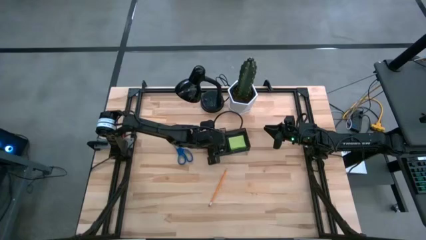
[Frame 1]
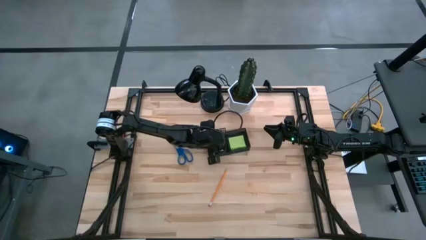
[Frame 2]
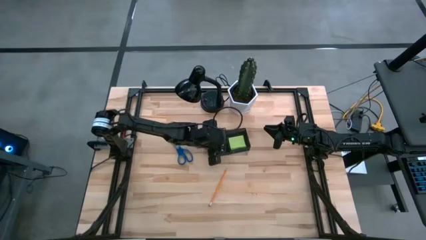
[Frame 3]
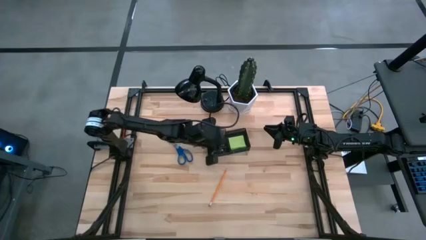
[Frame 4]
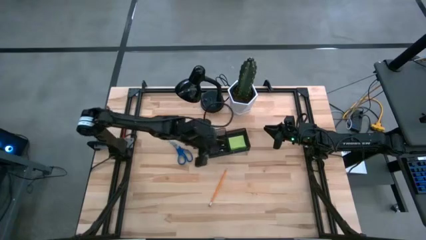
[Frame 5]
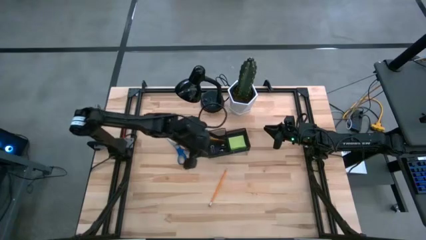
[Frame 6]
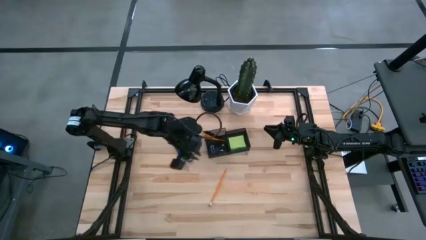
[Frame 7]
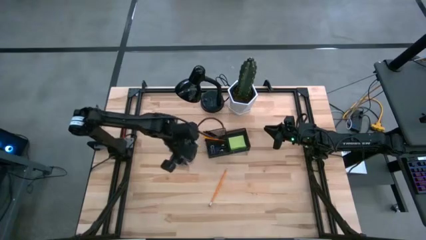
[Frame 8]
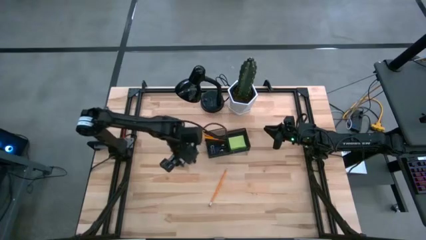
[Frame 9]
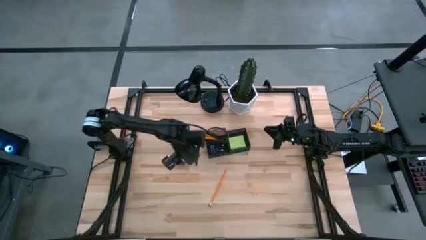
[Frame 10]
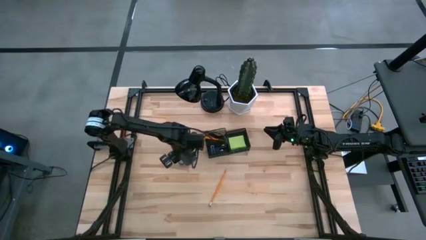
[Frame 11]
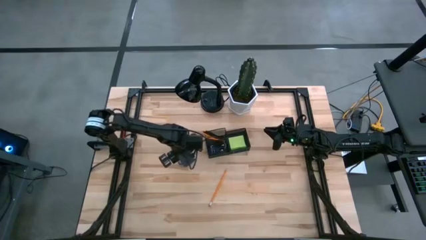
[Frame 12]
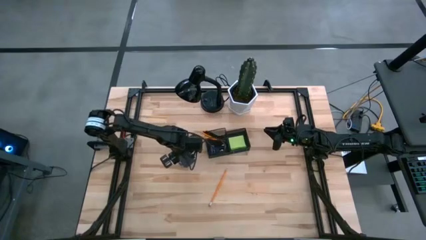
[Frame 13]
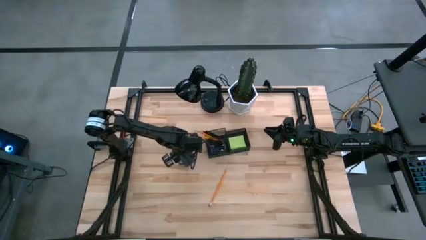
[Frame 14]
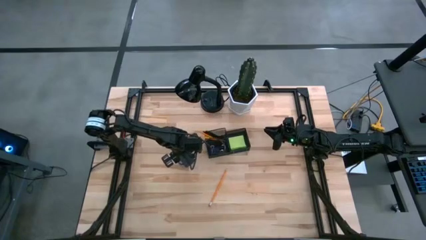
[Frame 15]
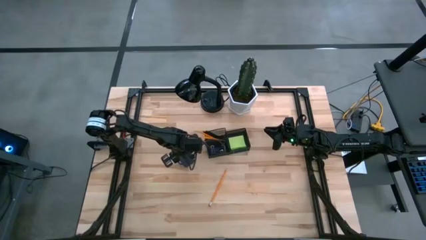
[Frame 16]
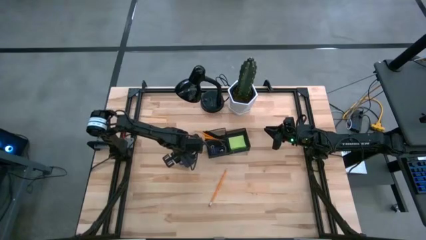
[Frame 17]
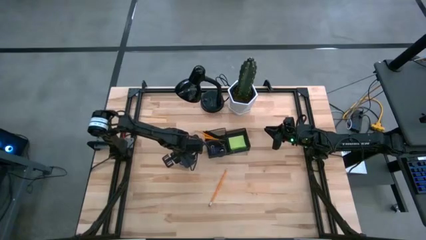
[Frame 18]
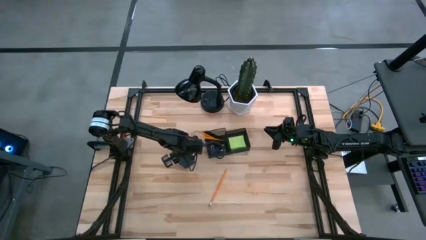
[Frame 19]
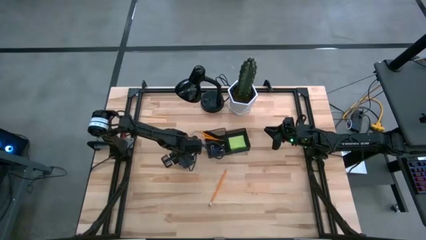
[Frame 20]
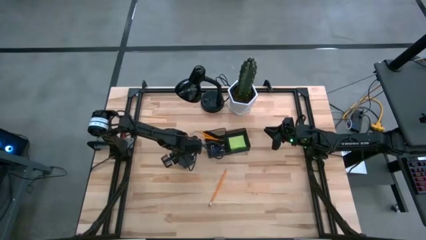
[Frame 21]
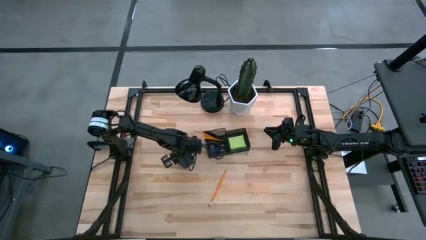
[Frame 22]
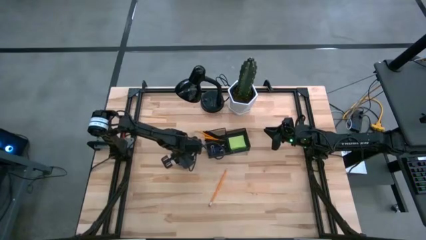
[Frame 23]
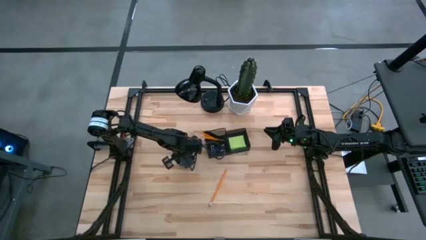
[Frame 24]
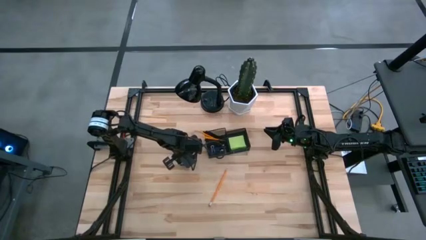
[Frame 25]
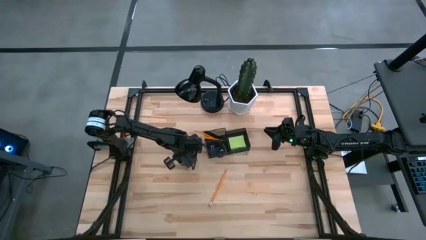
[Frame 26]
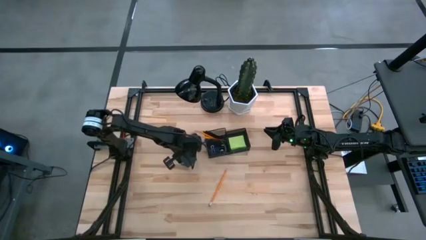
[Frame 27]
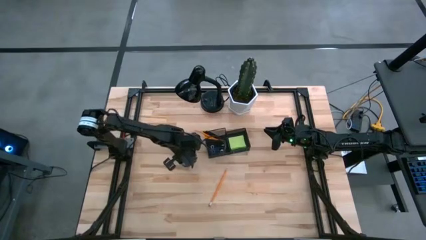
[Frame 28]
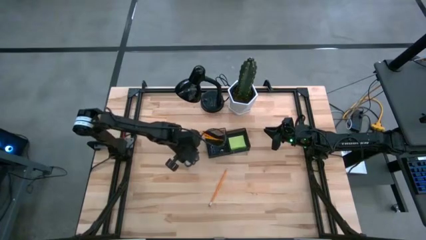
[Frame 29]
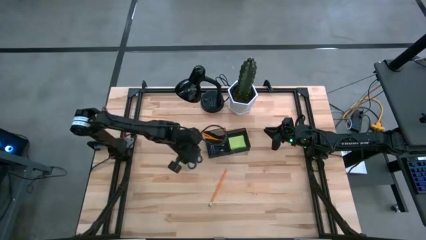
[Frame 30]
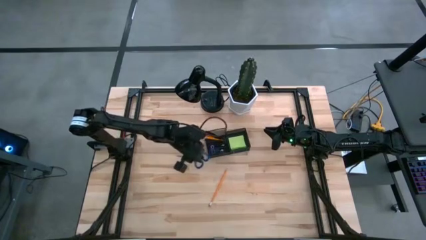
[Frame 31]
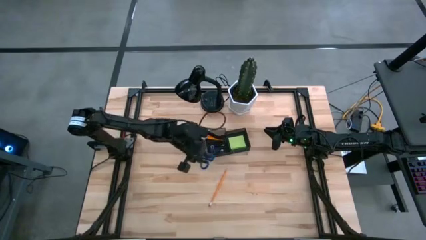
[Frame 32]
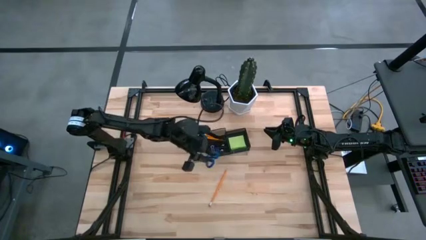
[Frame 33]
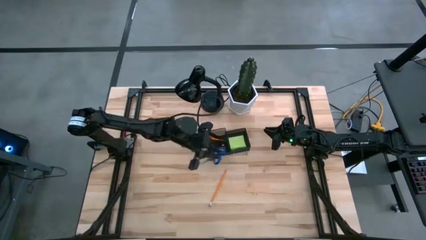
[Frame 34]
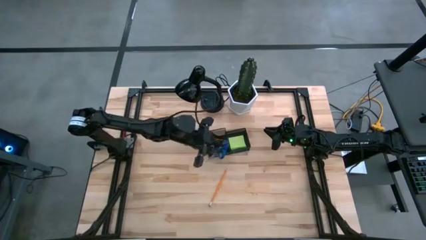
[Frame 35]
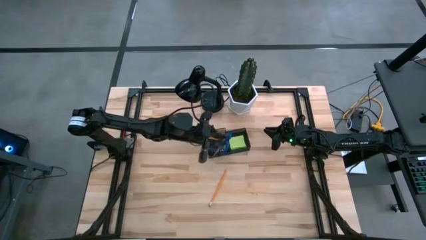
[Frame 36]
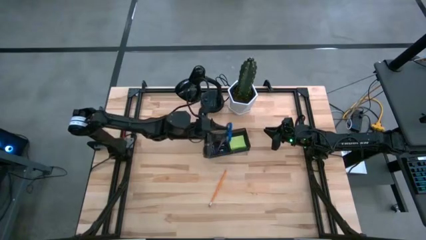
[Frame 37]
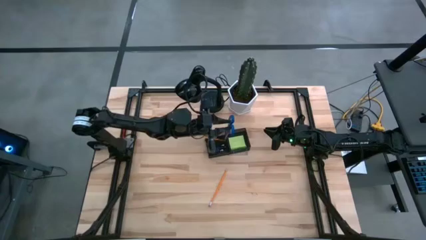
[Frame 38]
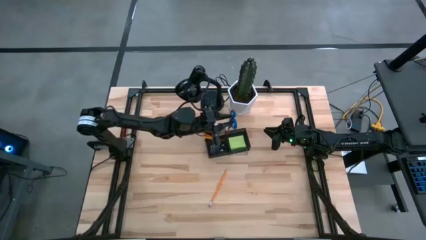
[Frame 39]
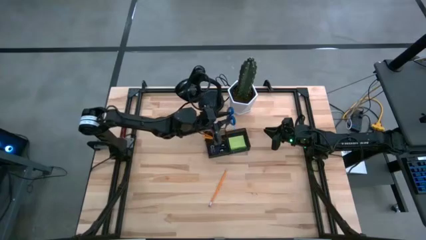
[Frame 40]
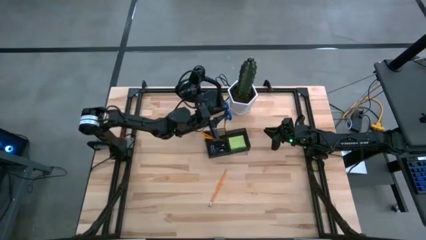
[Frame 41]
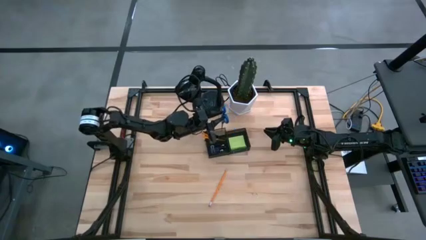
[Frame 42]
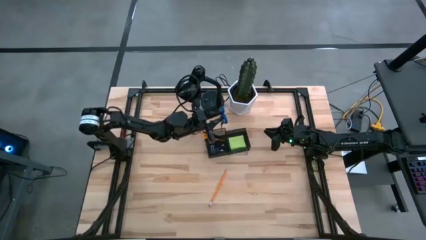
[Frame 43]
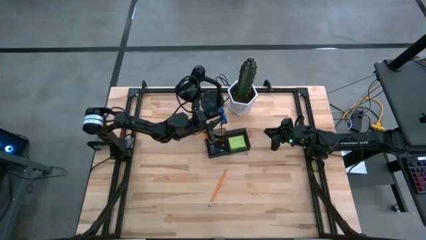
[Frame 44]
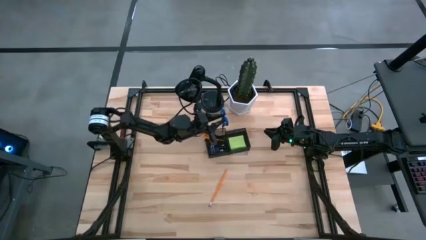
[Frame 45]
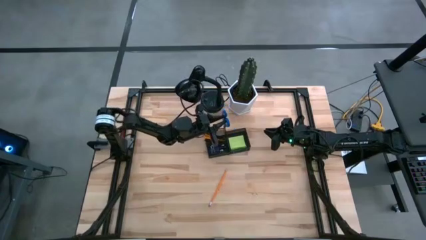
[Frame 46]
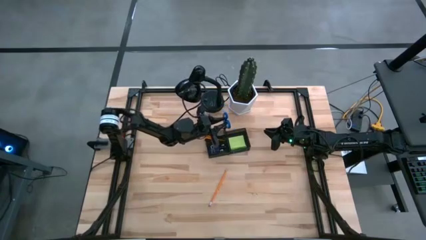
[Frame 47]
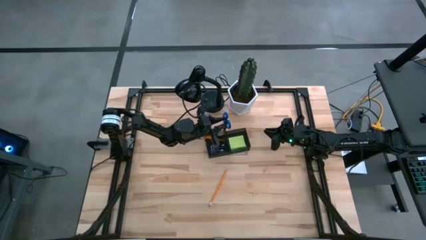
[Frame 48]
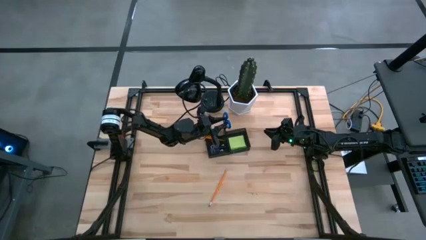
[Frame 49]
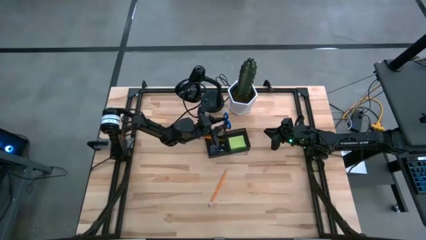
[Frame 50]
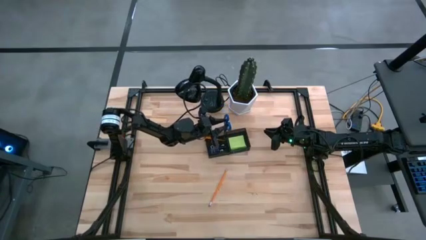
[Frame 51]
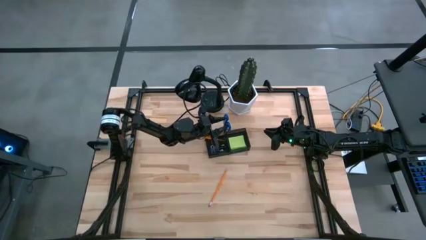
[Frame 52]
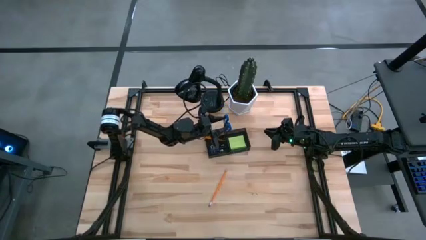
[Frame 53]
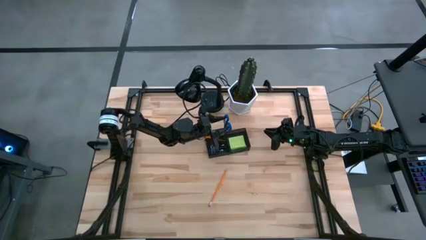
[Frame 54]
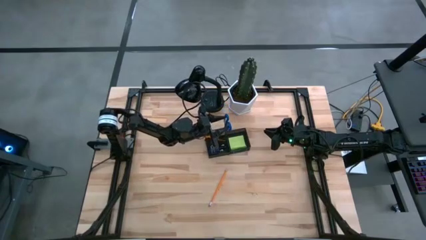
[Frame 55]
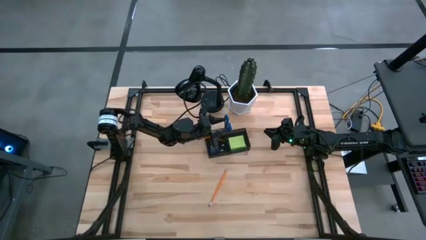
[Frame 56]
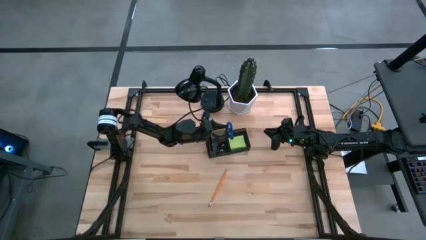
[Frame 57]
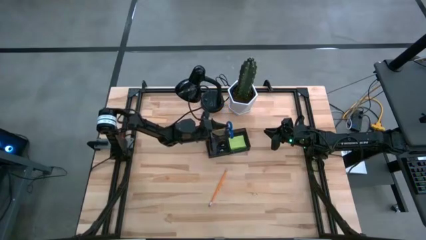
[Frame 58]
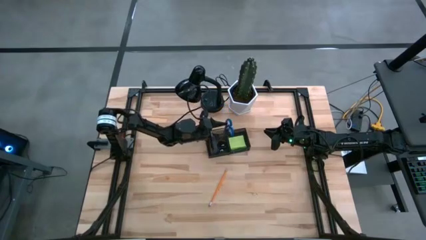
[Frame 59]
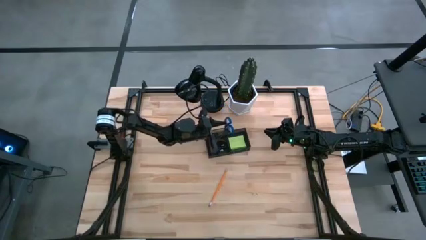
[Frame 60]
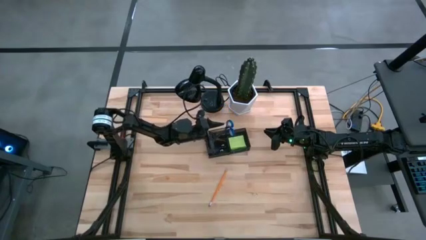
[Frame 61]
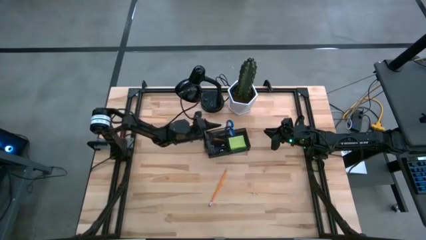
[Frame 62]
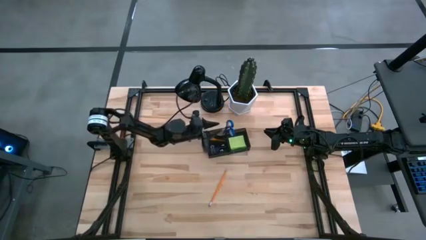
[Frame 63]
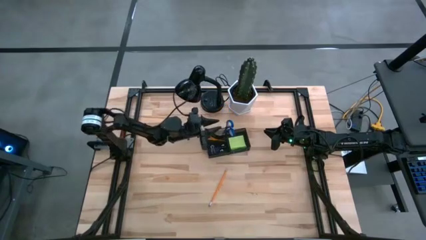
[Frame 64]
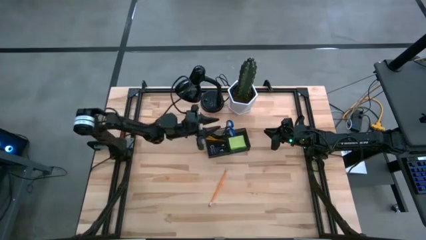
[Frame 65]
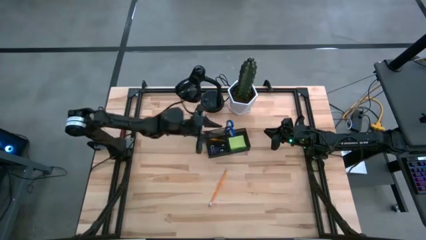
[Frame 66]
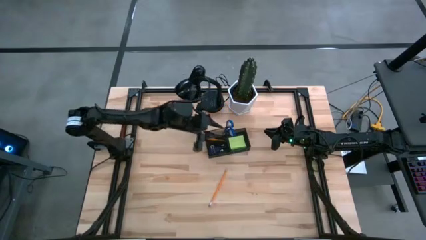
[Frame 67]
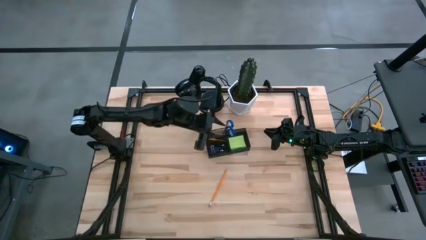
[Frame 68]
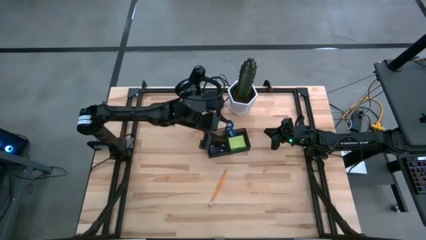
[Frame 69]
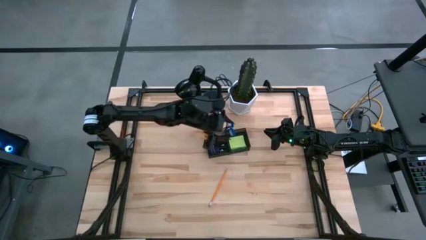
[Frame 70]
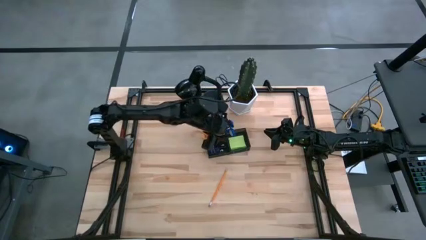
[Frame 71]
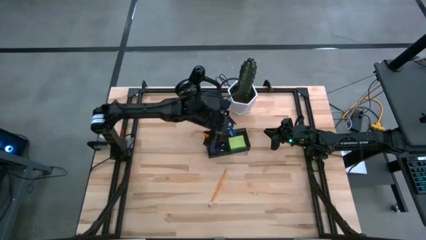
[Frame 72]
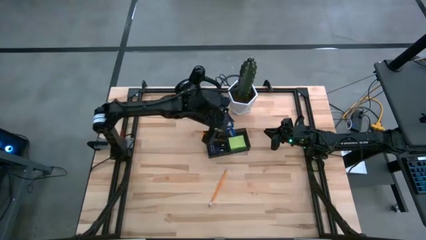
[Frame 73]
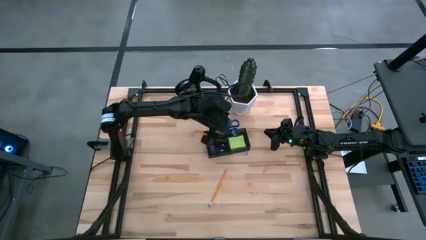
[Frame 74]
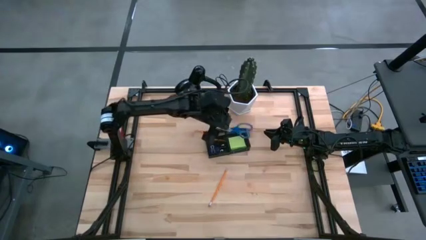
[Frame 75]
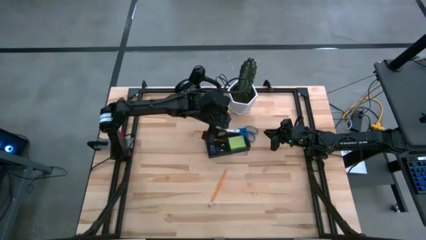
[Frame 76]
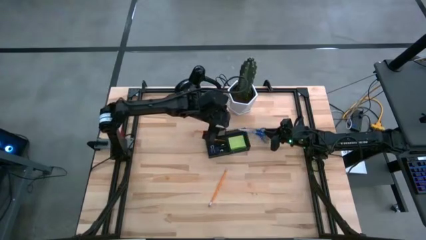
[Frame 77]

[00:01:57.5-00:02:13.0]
Task: Pick and place office supplies into organizer
Put the blue scissors into the desk organizer
